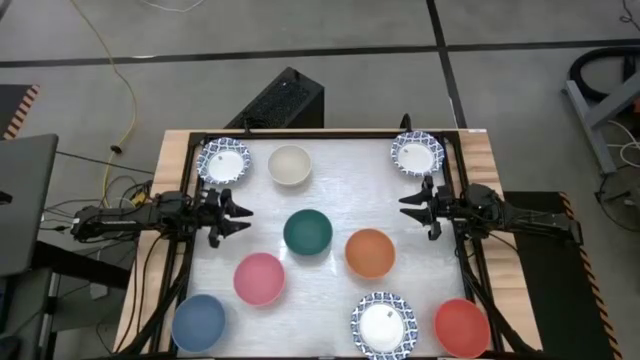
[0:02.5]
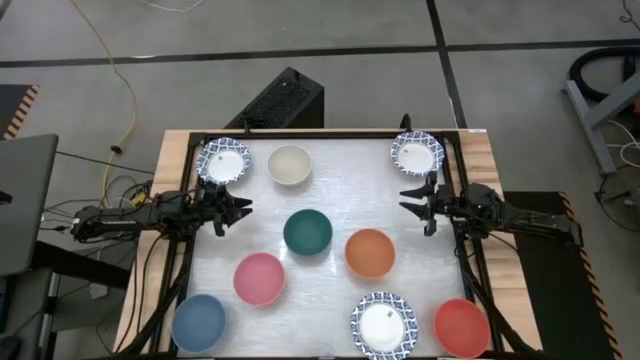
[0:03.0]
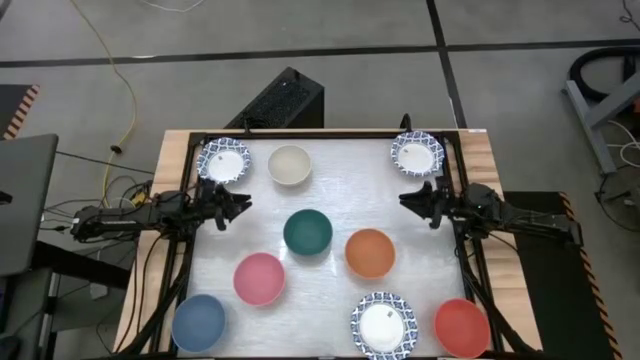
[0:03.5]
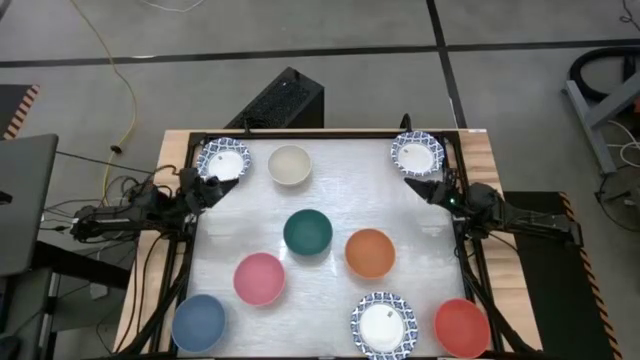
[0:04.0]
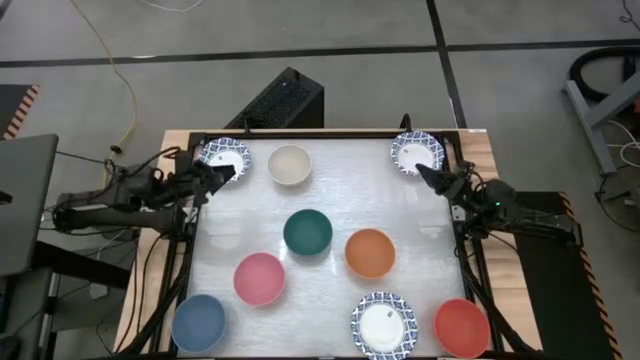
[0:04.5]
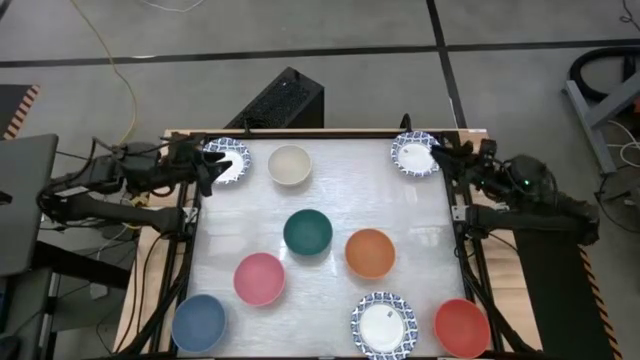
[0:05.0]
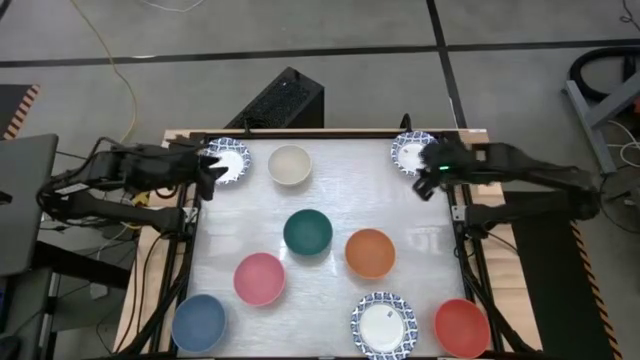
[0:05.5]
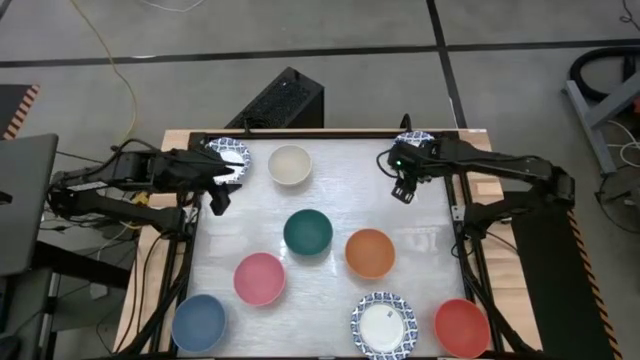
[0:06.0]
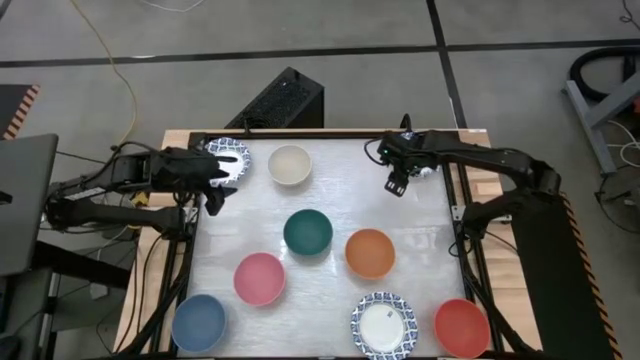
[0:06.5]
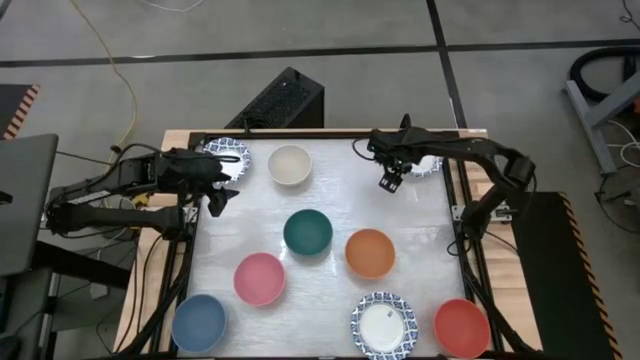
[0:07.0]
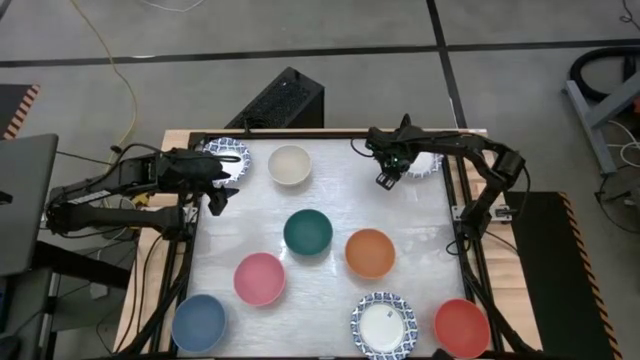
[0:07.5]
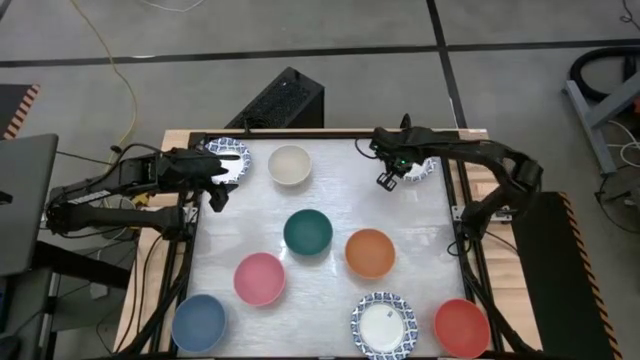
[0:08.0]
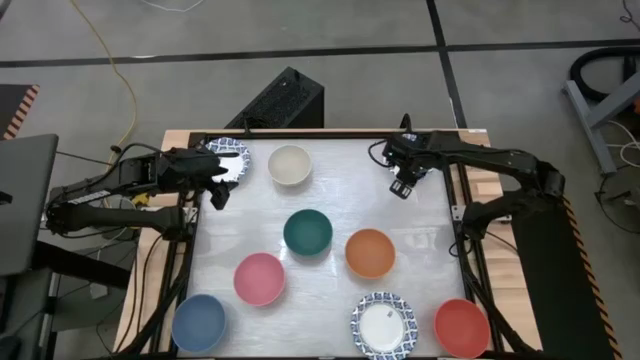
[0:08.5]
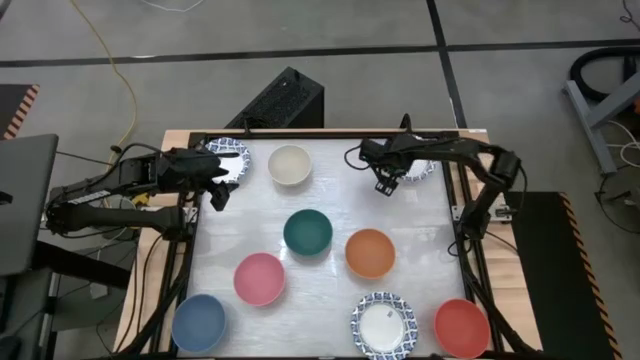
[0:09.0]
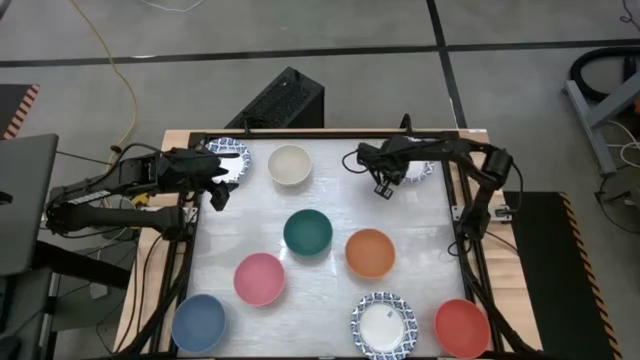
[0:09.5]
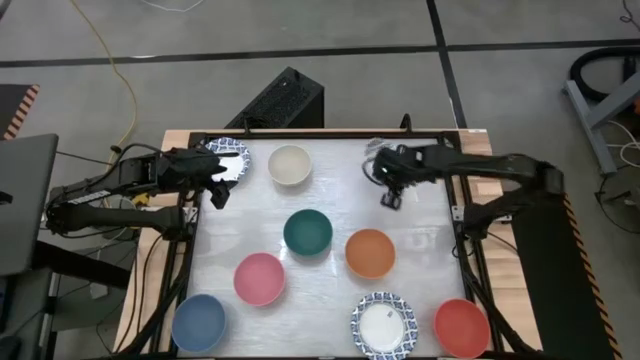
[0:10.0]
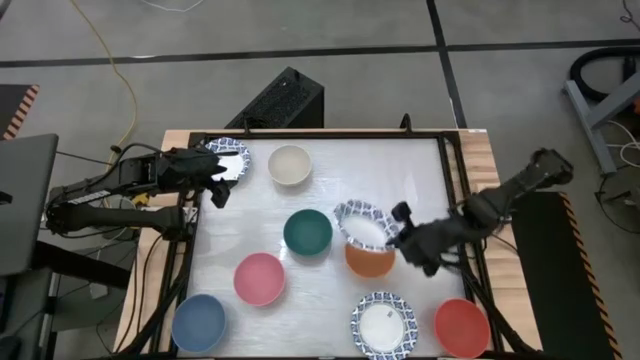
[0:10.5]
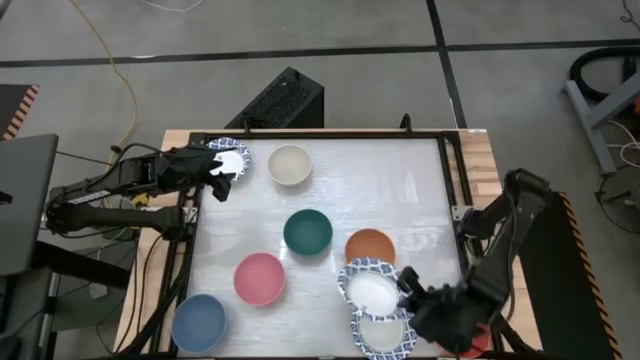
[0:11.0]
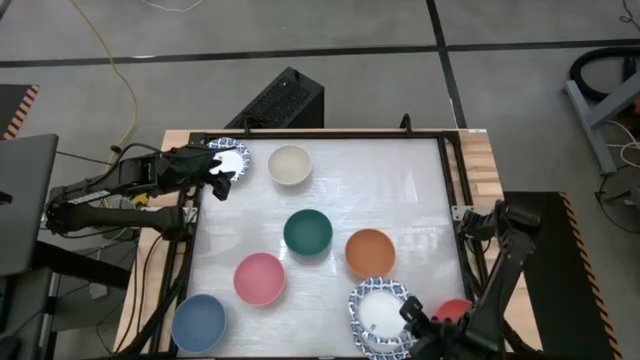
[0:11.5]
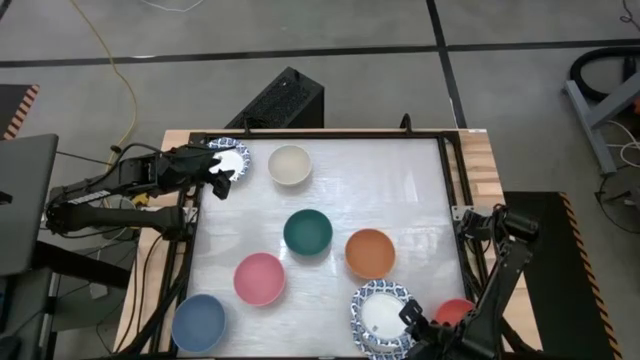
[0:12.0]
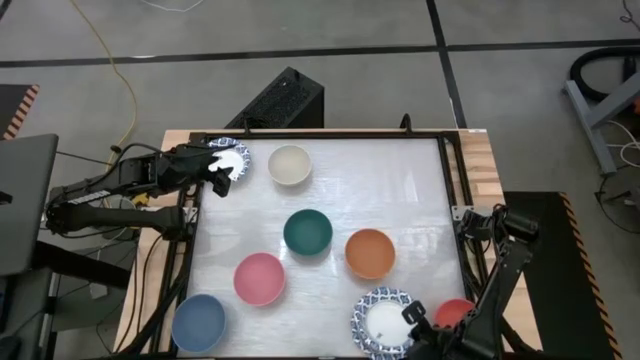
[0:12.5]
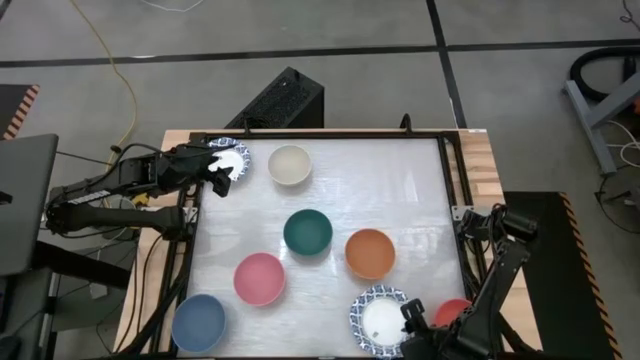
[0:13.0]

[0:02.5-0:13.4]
Stack the top right white and blue bowl onto the bottom right white and blue bowl

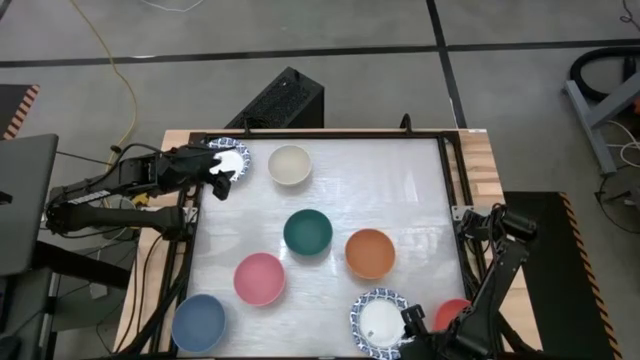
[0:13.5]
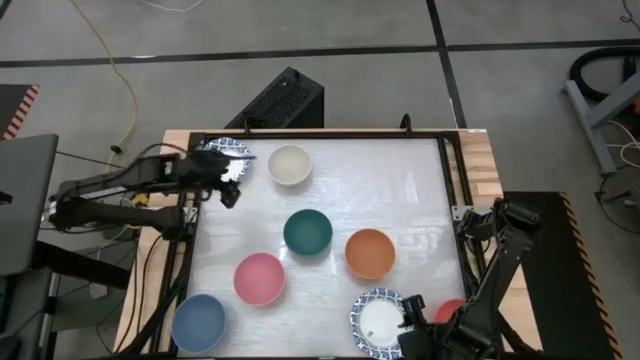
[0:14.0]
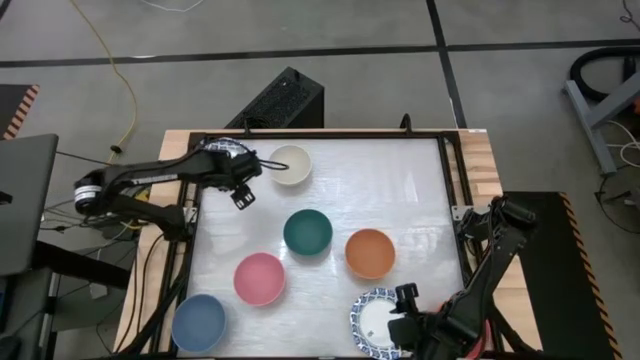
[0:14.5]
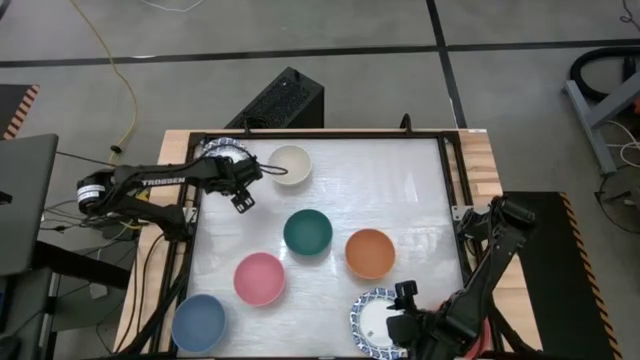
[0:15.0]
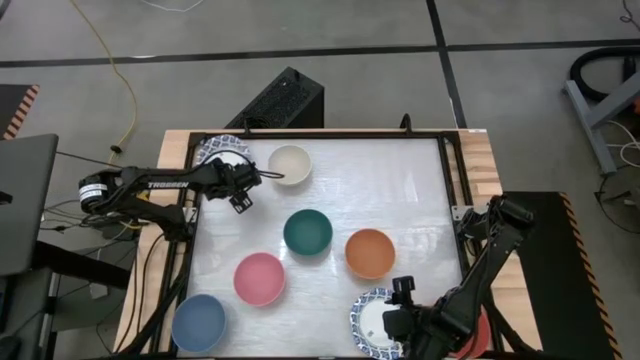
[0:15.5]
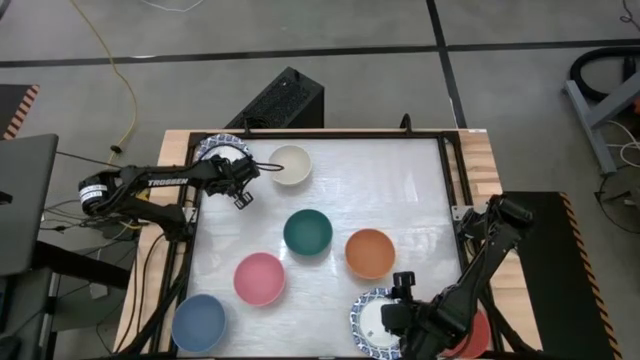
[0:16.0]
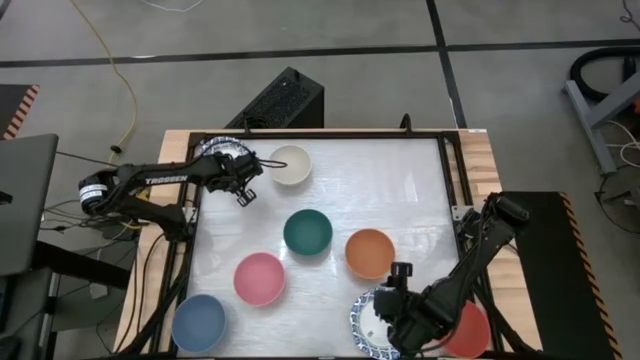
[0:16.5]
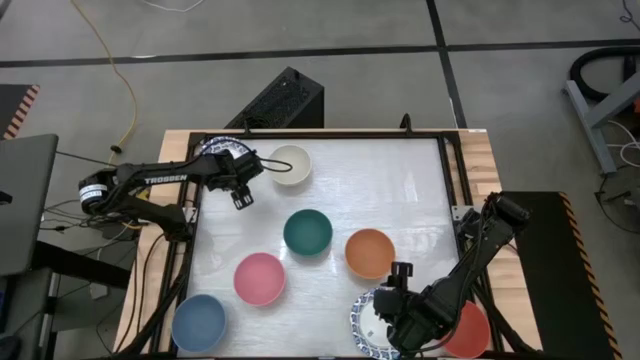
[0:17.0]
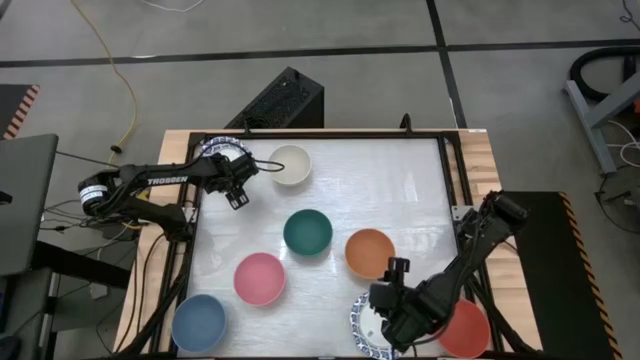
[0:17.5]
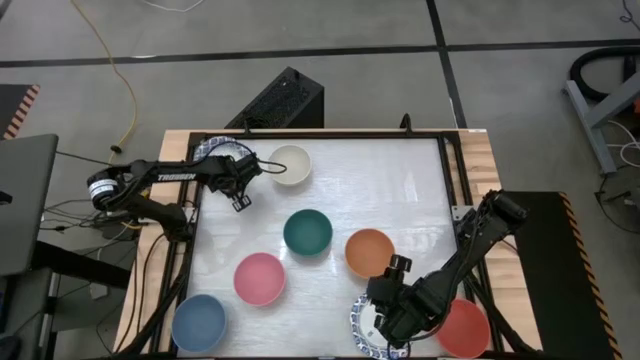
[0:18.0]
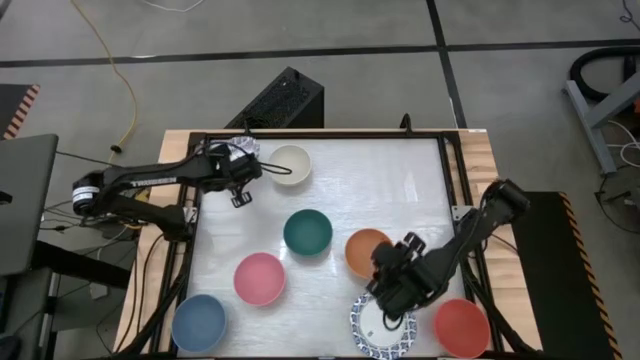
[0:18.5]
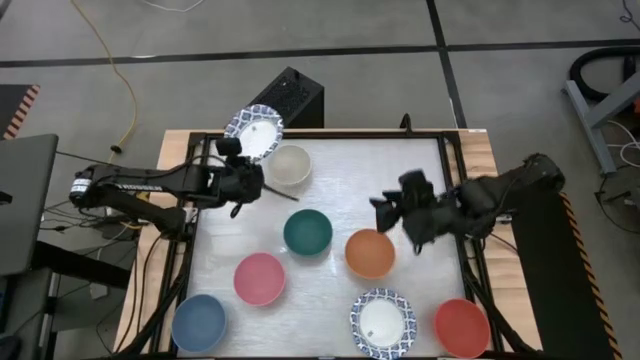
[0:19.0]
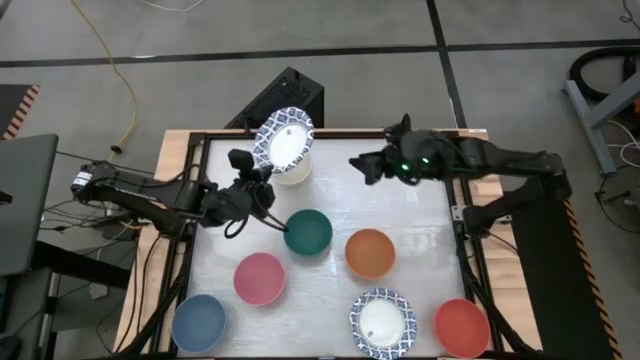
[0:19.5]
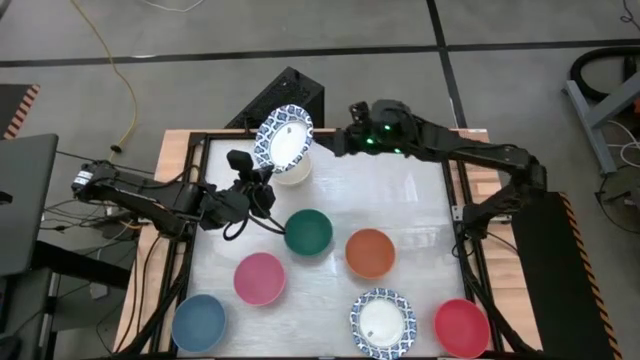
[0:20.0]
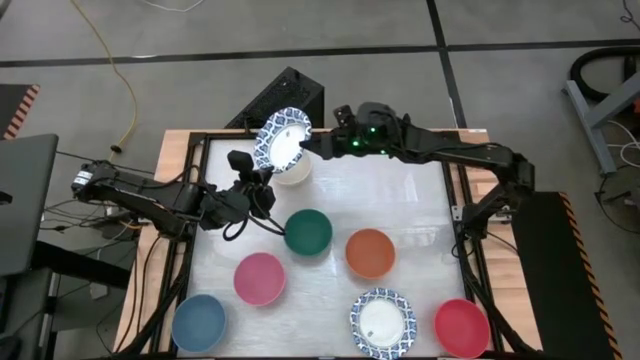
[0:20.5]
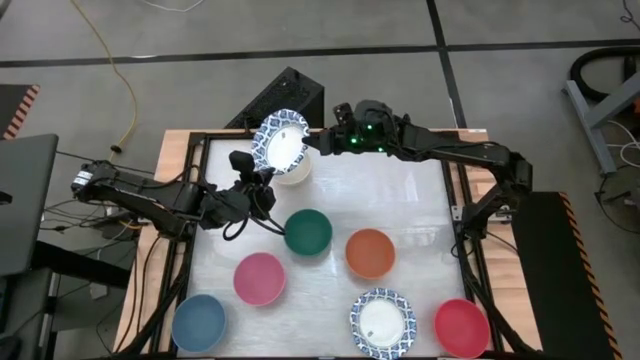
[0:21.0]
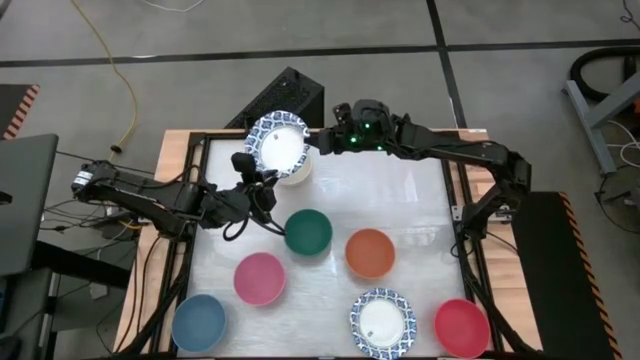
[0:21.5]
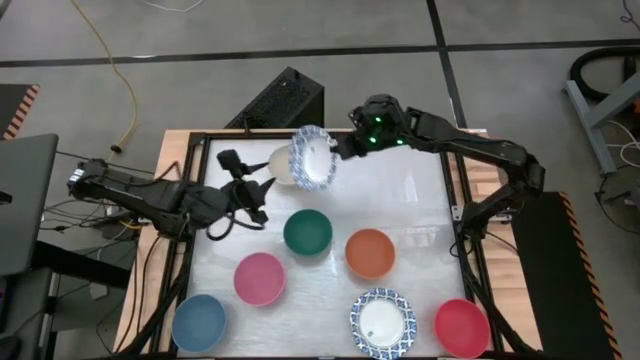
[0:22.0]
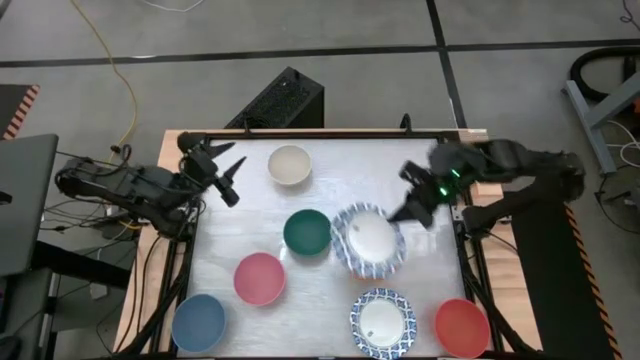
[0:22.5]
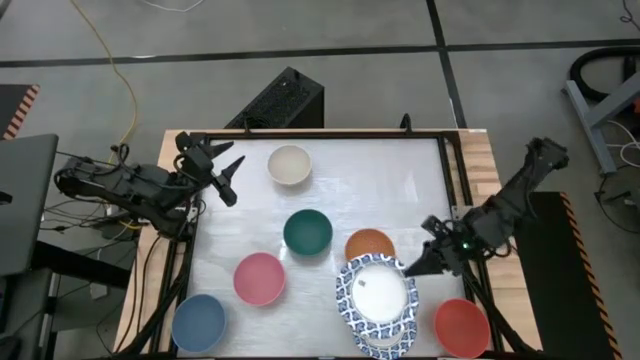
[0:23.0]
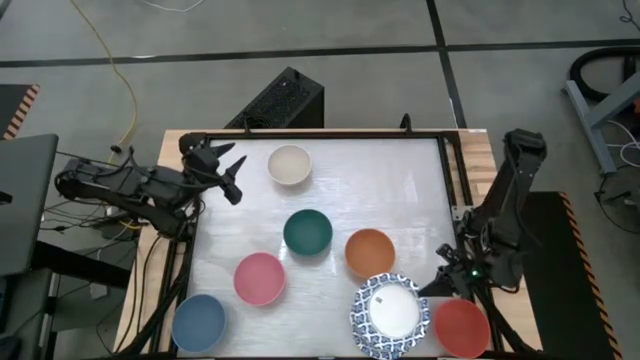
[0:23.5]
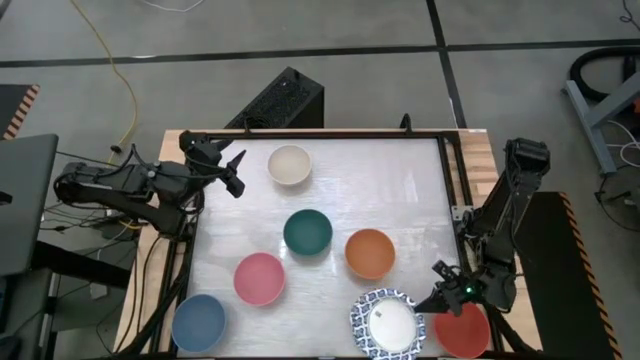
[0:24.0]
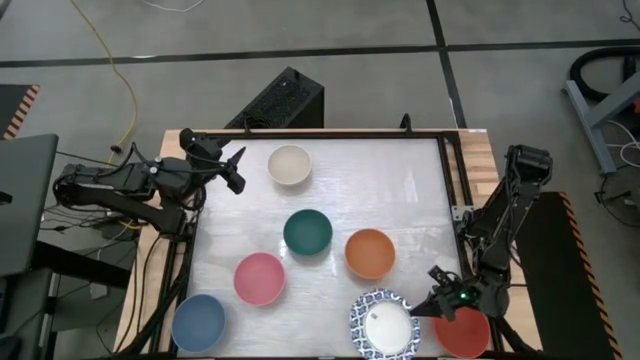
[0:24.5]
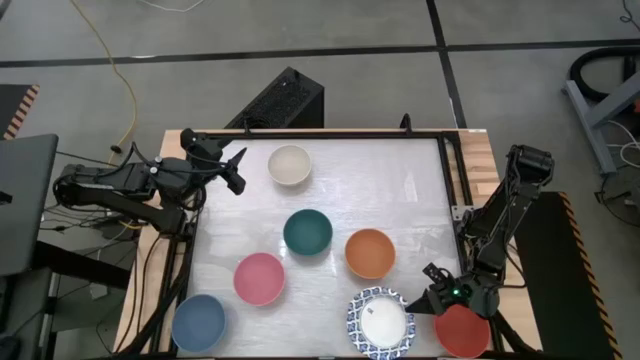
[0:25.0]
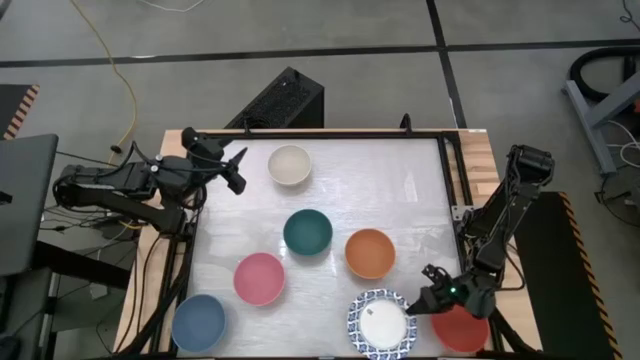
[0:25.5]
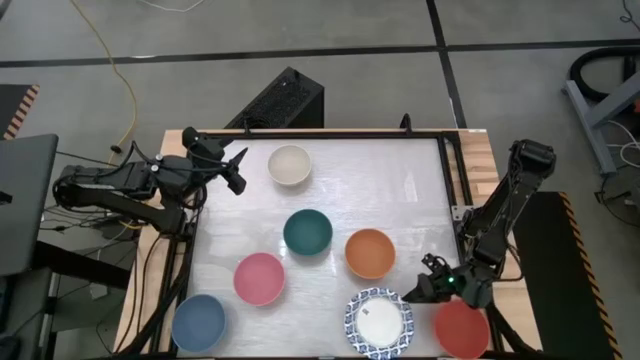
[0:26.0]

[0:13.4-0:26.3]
Stack the top left white and blue bowl onto the stacked white and blue bowls
